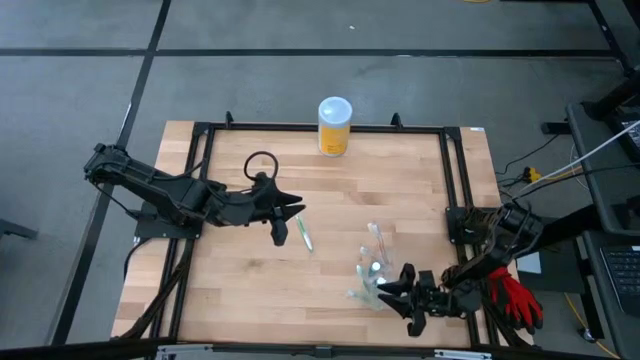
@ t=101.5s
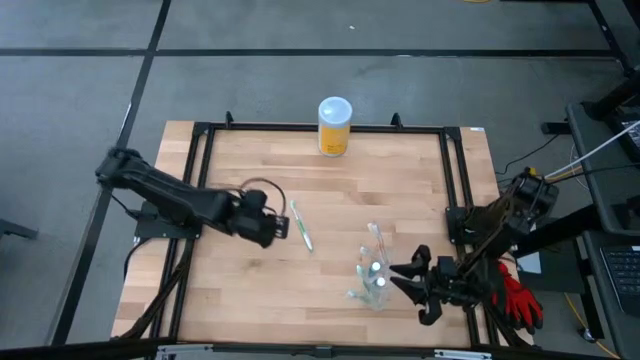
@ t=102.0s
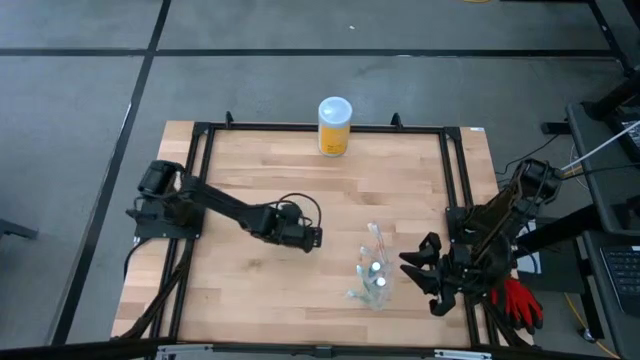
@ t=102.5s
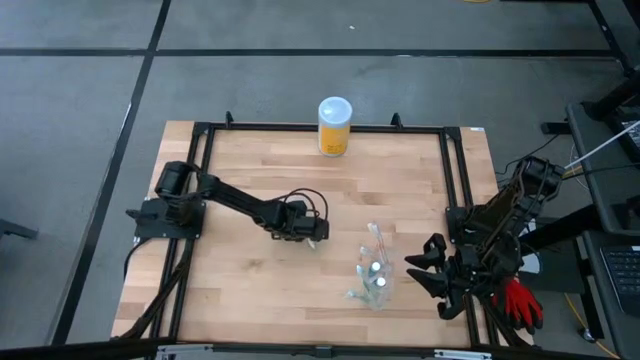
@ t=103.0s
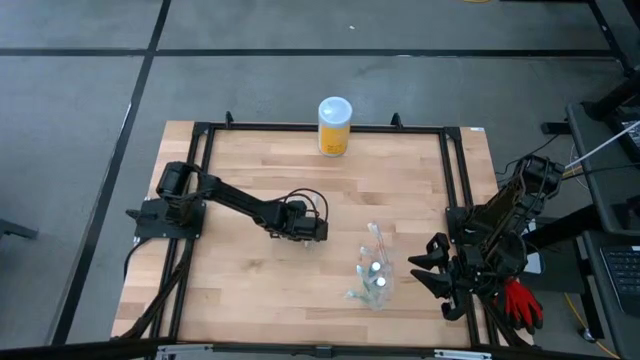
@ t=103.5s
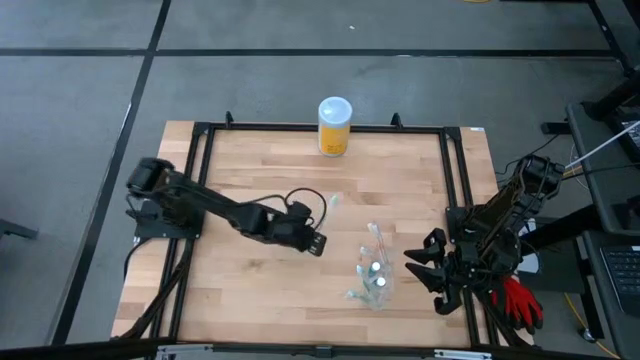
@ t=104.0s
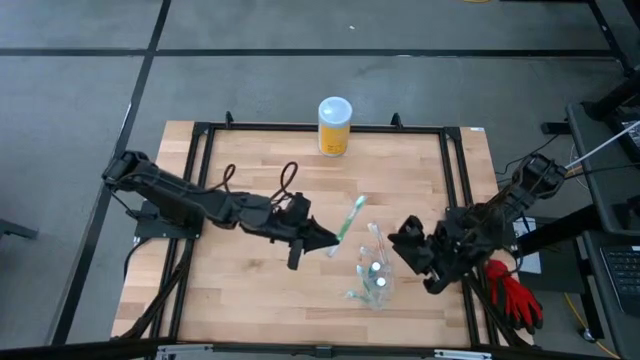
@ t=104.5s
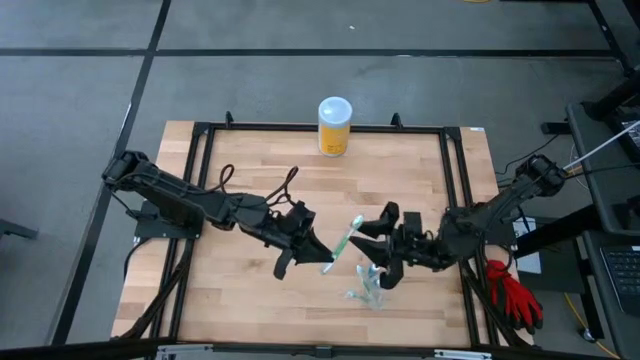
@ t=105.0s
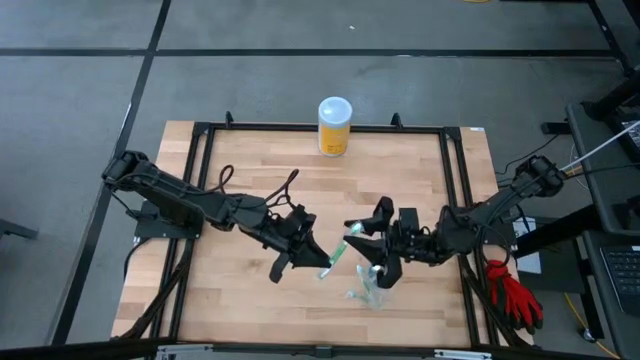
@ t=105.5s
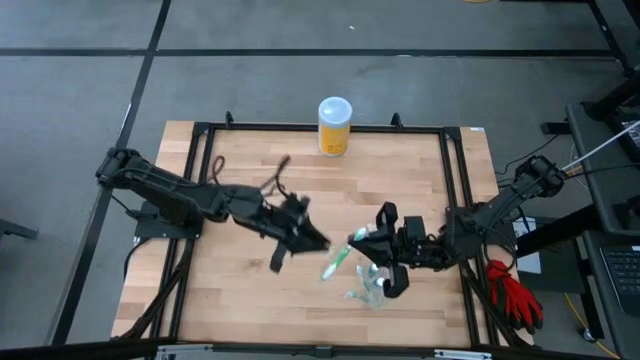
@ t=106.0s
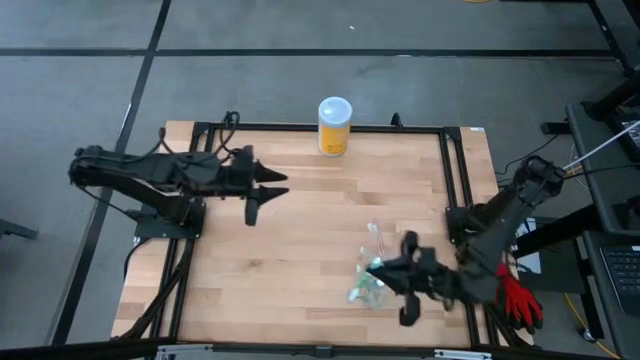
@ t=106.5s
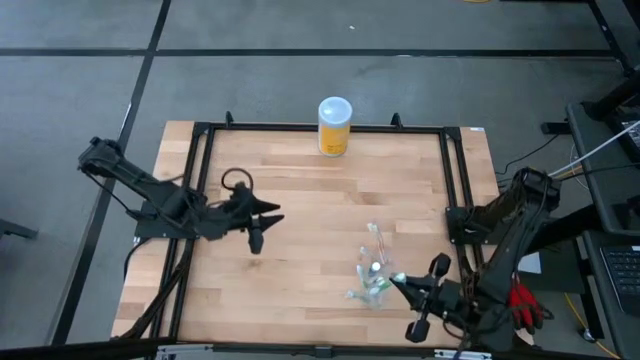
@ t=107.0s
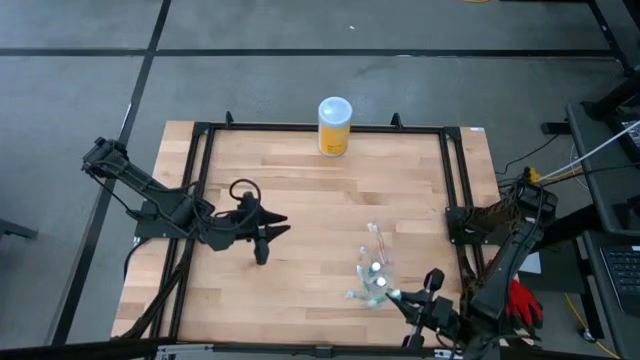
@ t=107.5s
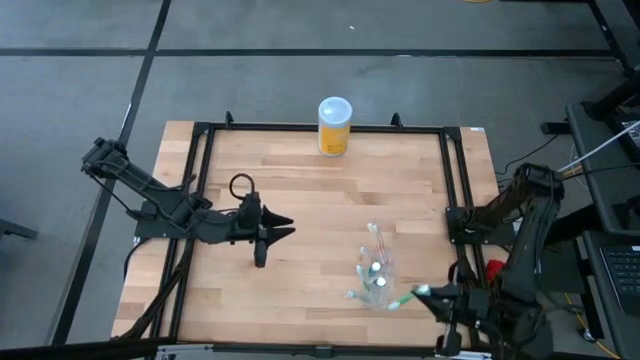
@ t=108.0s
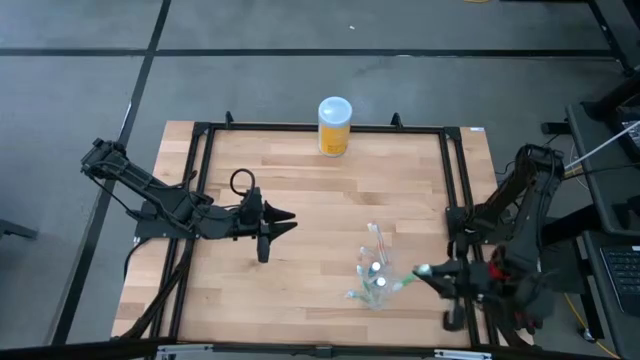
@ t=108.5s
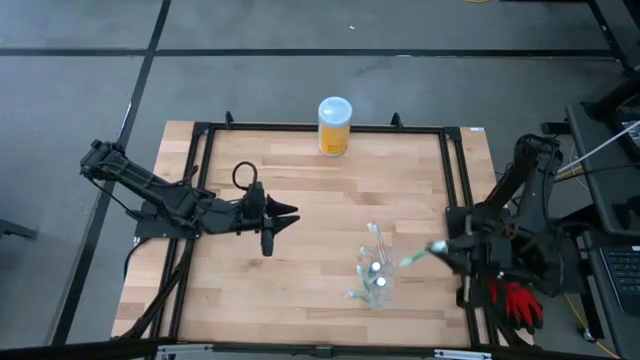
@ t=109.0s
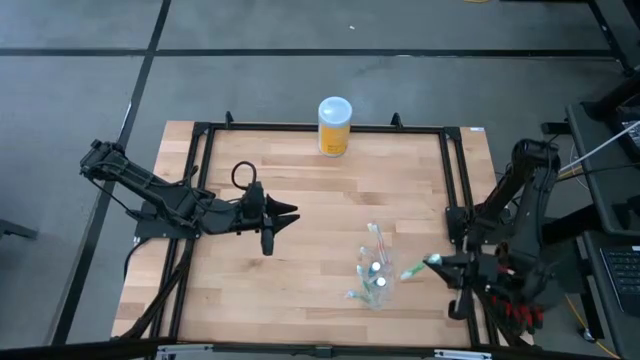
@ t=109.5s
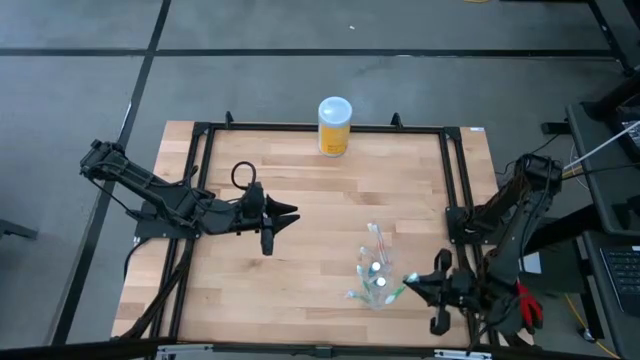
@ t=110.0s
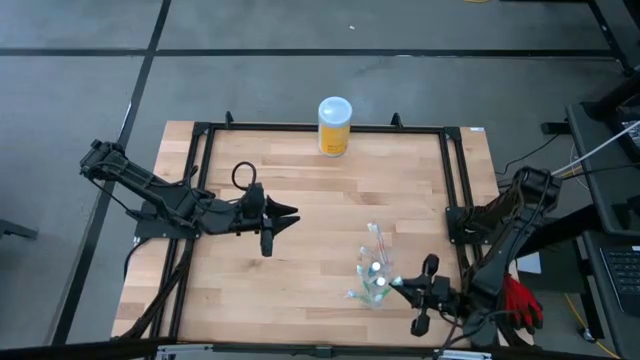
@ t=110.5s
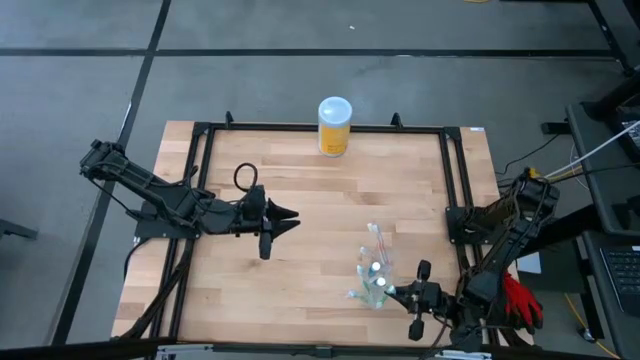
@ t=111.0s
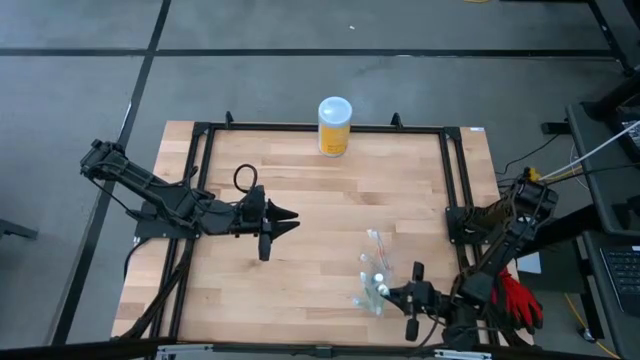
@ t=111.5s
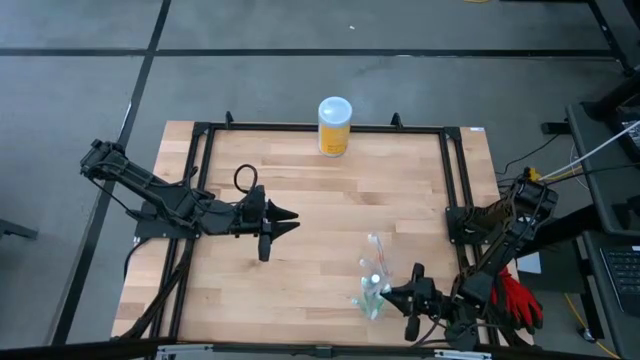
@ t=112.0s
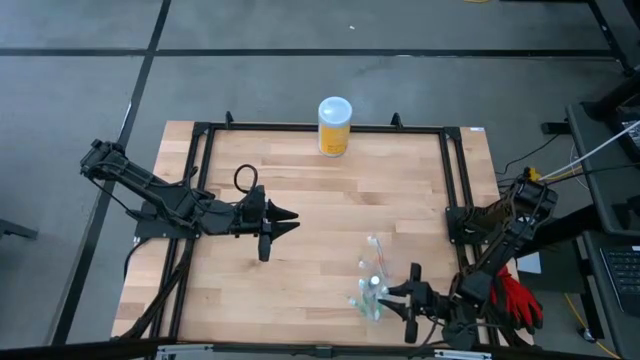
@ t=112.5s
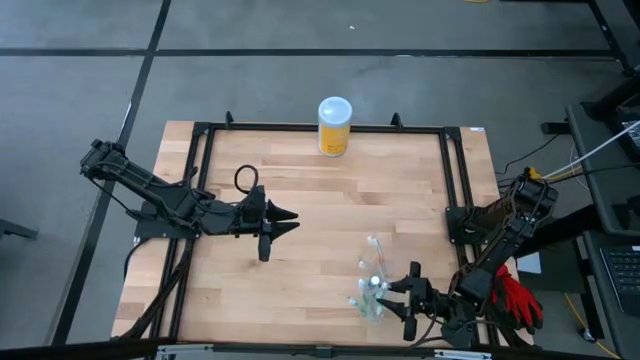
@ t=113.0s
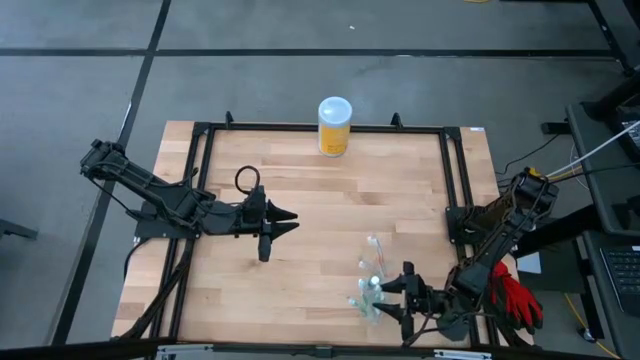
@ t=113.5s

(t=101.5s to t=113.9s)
Task: Pick & Place toothbrushing station
Put the green toothbrush into the transparent organizer

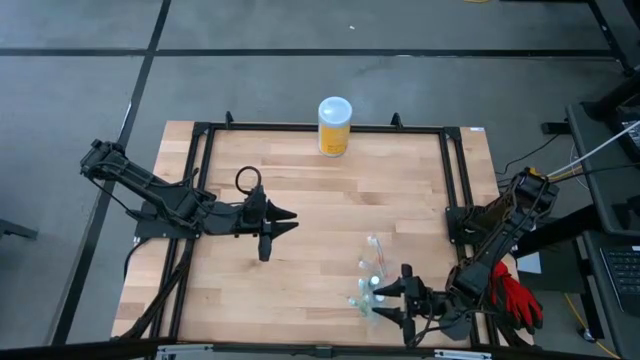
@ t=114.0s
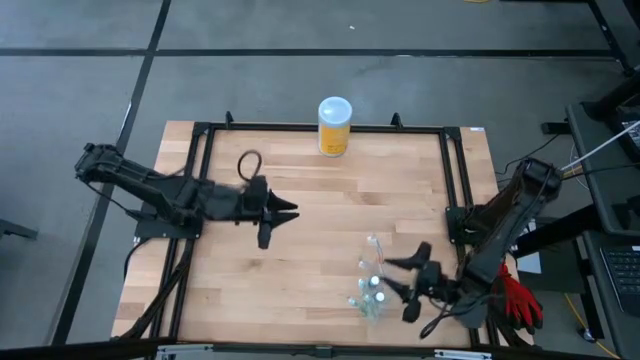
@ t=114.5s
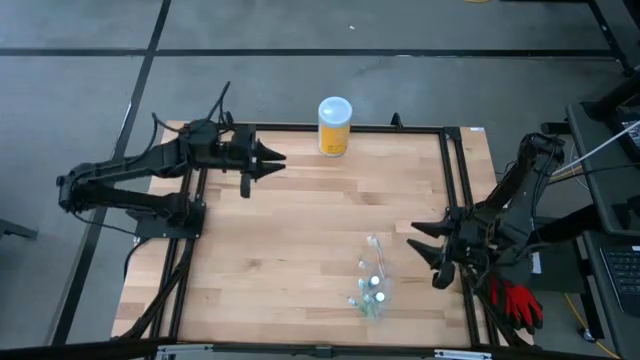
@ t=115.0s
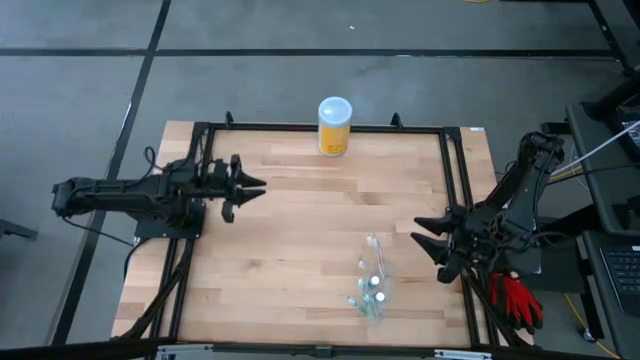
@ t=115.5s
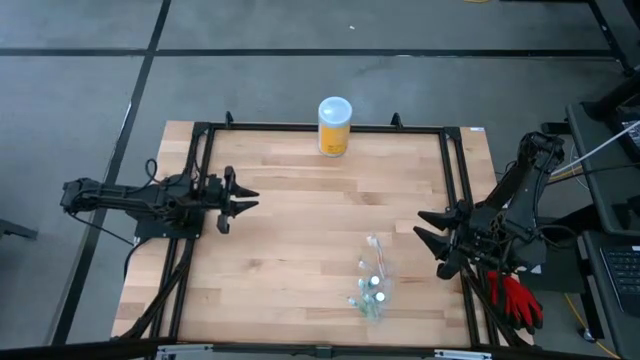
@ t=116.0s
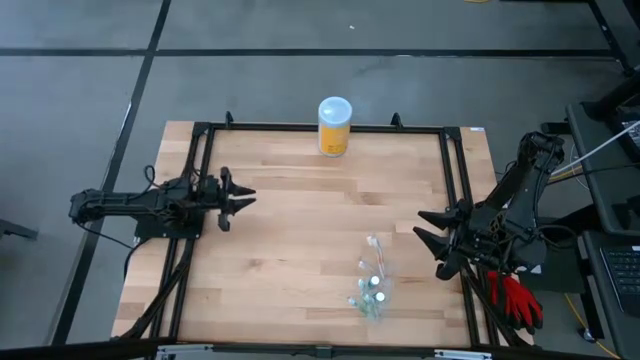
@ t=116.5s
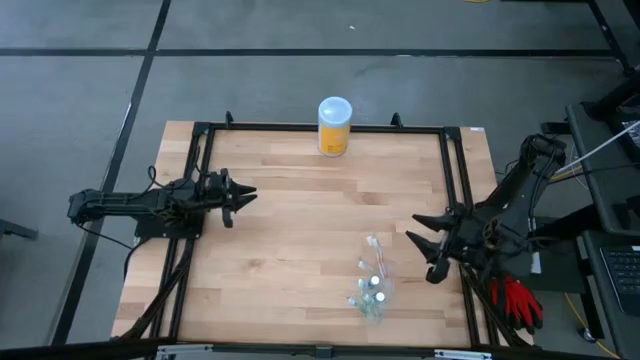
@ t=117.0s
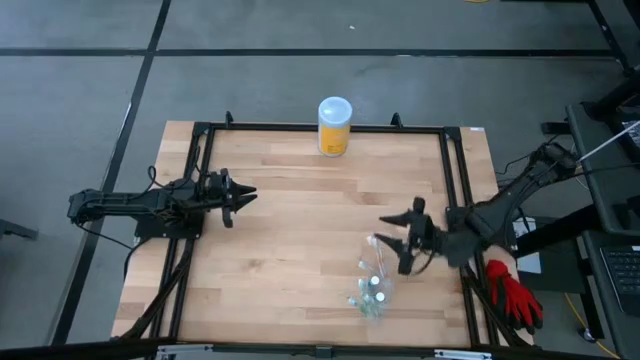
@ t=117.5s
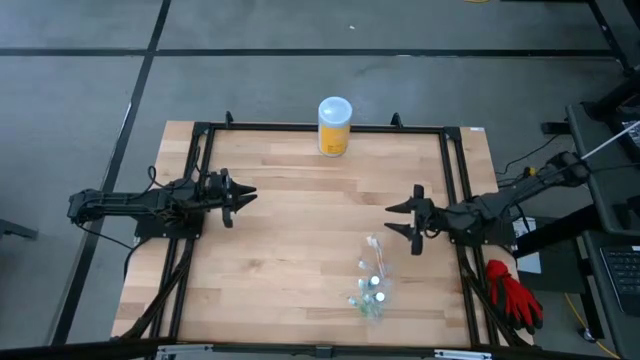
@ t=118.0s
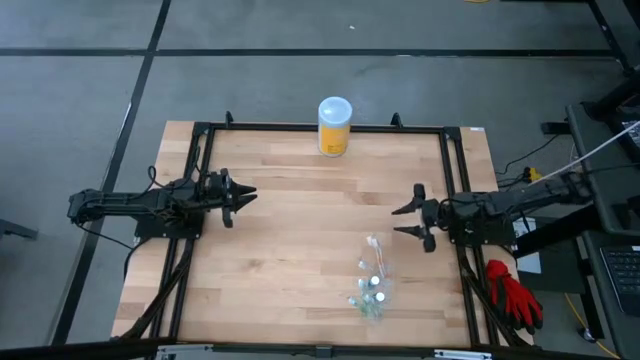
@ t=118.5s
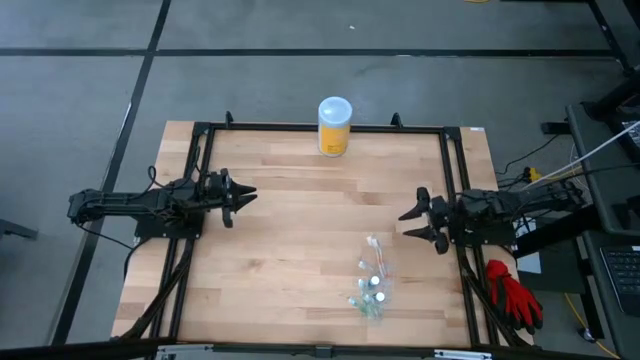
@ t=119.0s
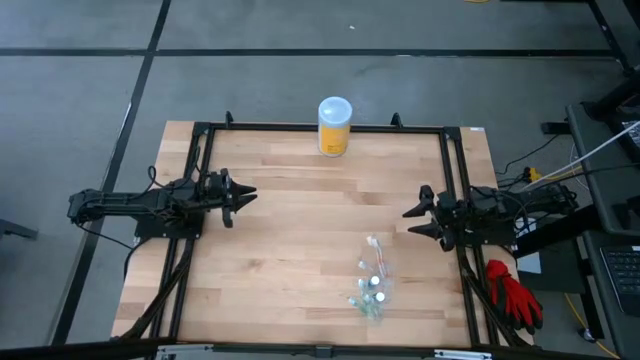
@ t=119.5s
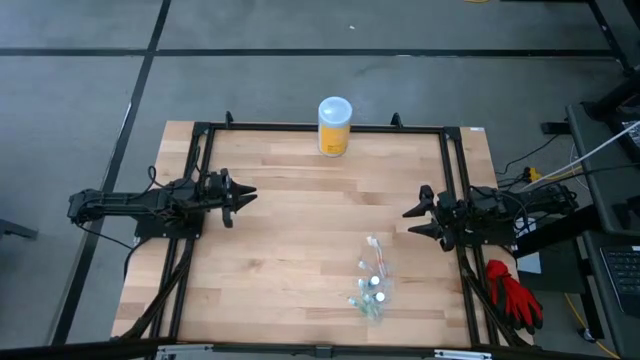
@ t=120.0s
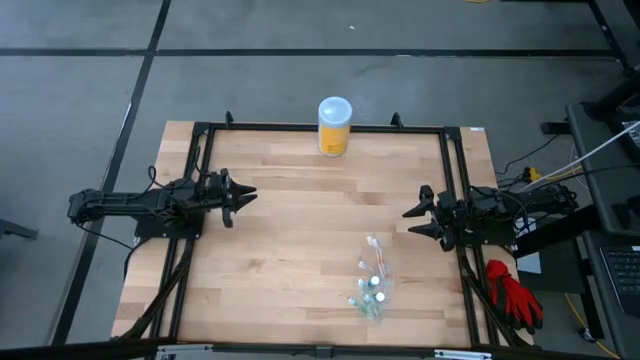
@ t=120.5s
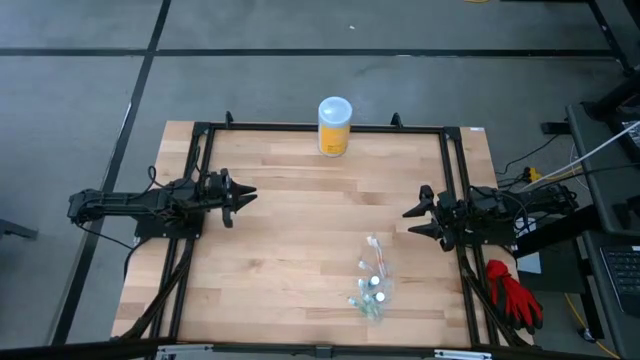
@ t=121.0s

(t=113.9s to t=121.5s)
Return to Home Position
